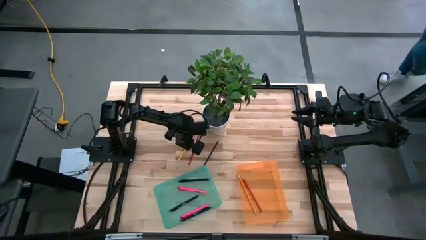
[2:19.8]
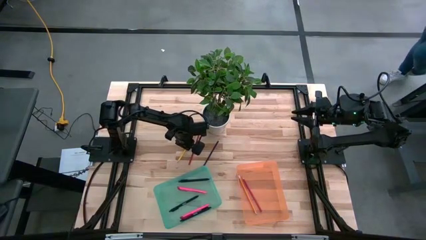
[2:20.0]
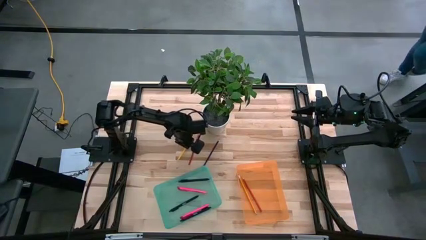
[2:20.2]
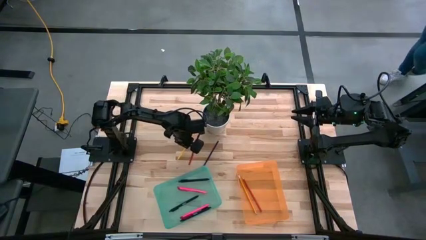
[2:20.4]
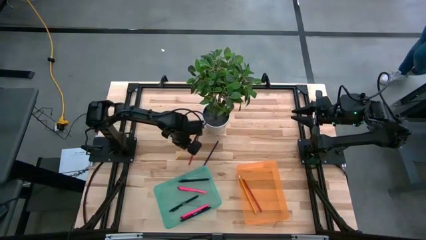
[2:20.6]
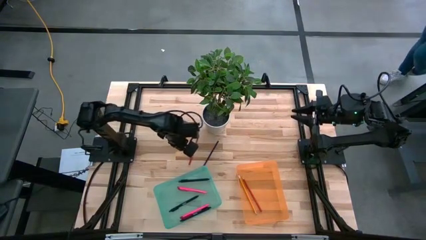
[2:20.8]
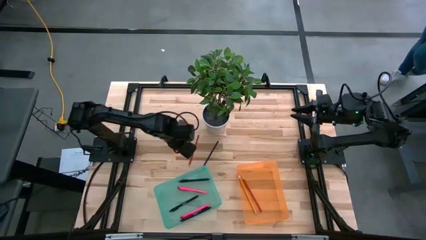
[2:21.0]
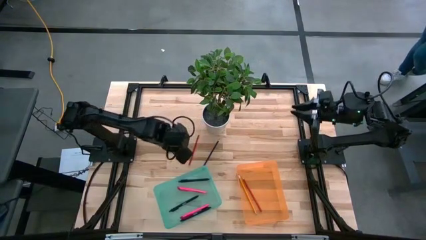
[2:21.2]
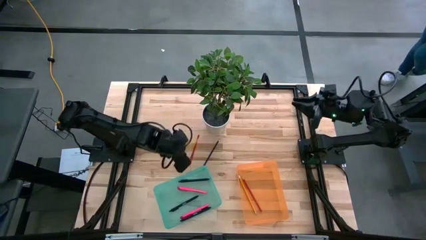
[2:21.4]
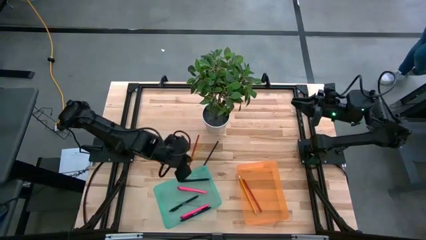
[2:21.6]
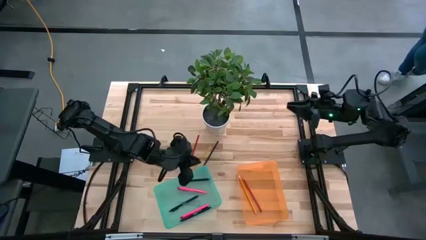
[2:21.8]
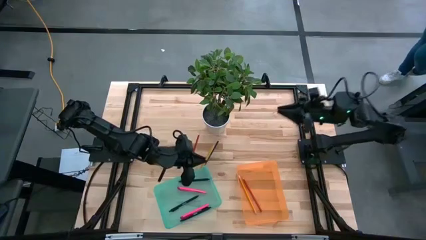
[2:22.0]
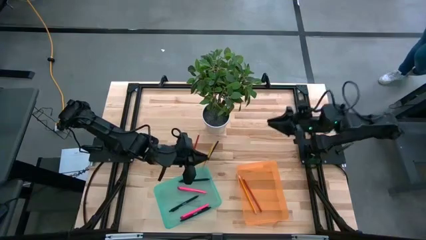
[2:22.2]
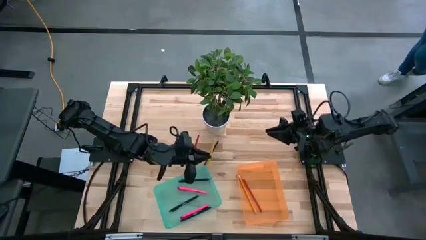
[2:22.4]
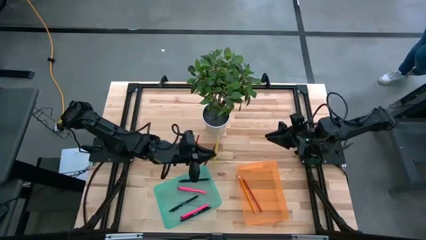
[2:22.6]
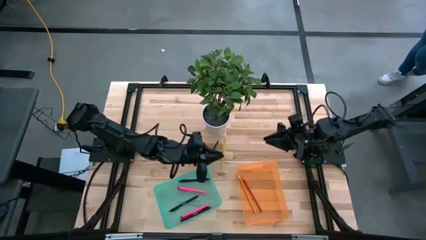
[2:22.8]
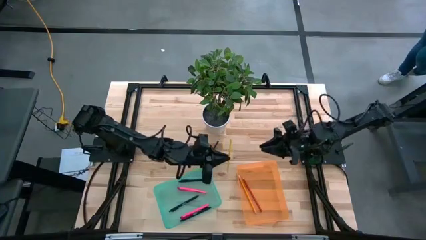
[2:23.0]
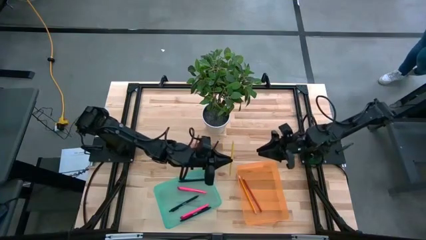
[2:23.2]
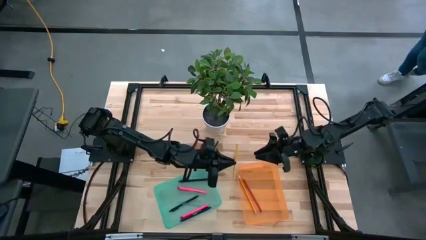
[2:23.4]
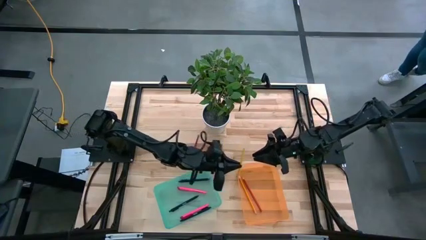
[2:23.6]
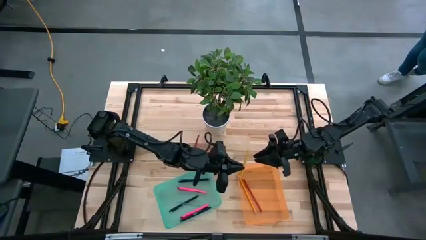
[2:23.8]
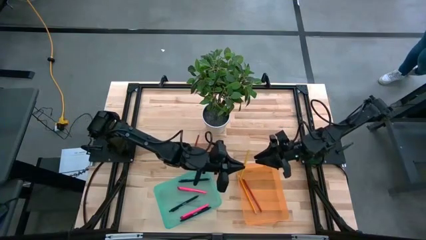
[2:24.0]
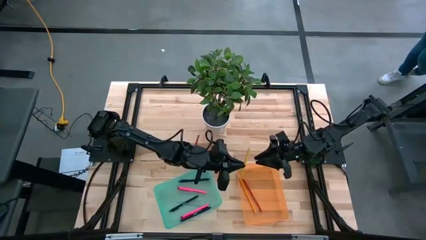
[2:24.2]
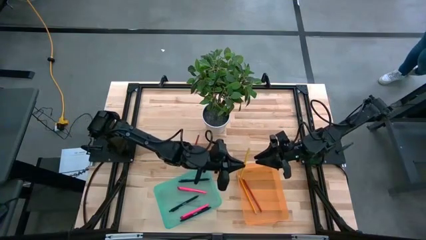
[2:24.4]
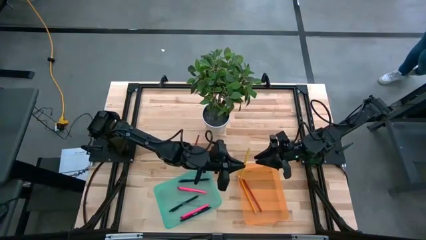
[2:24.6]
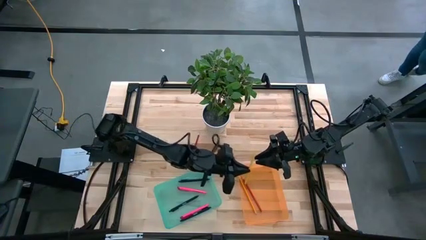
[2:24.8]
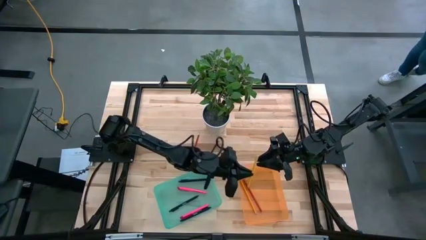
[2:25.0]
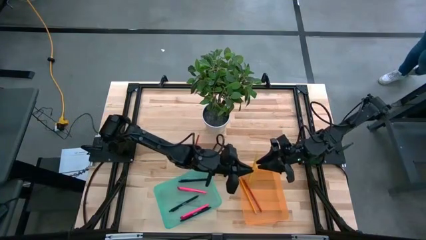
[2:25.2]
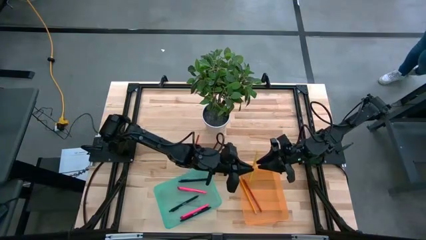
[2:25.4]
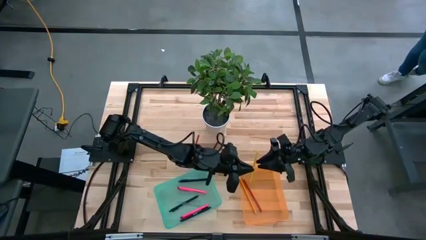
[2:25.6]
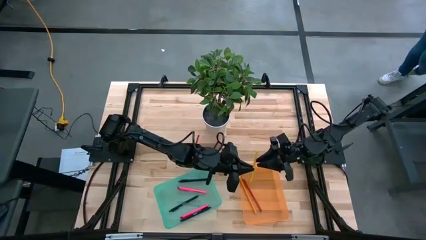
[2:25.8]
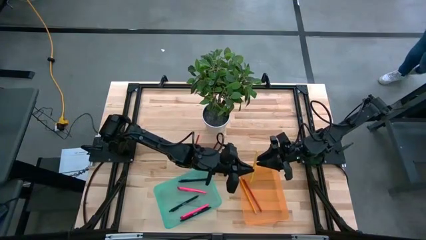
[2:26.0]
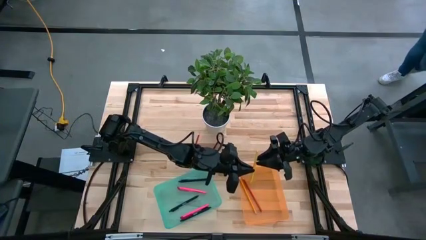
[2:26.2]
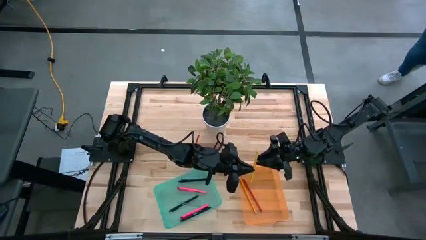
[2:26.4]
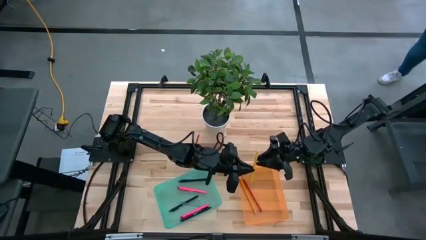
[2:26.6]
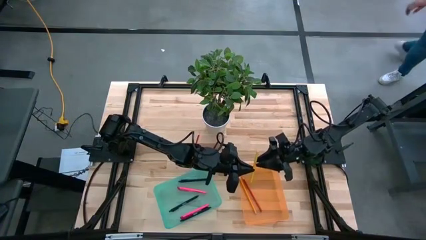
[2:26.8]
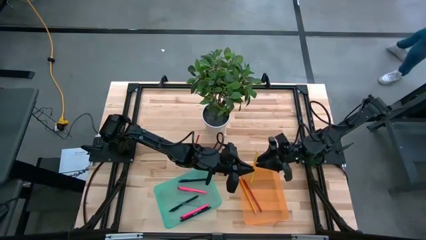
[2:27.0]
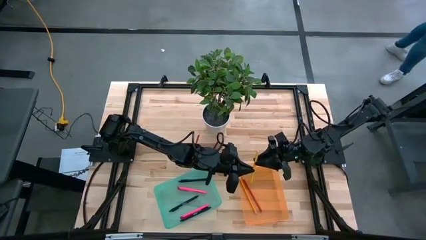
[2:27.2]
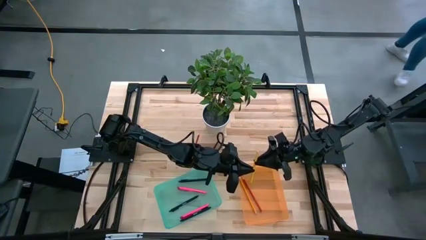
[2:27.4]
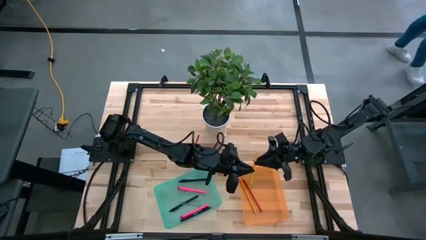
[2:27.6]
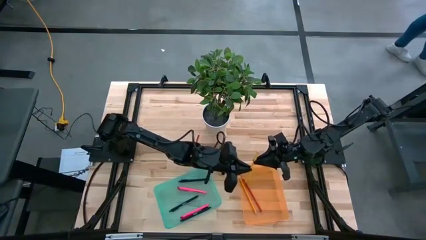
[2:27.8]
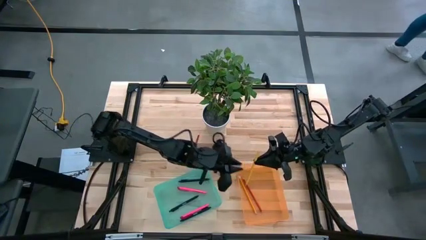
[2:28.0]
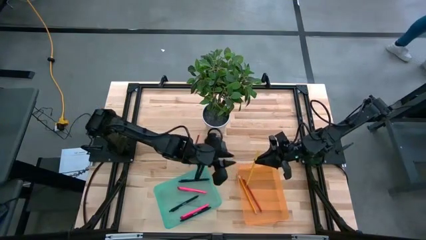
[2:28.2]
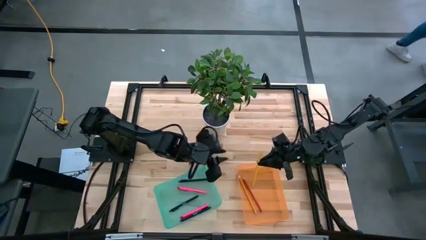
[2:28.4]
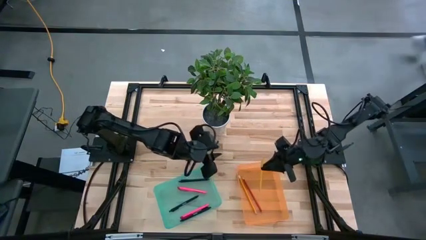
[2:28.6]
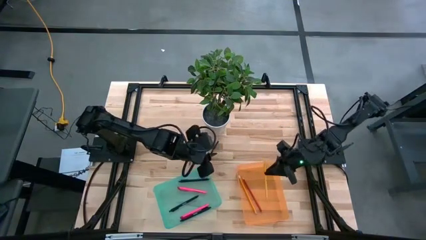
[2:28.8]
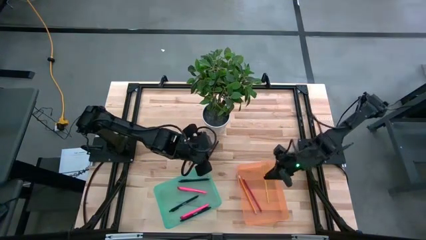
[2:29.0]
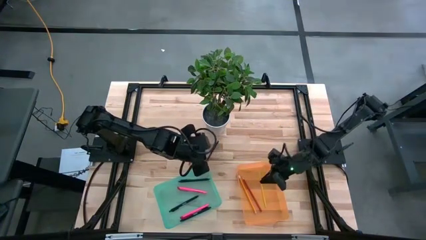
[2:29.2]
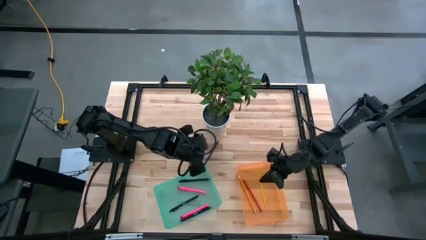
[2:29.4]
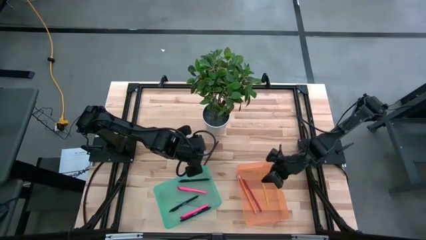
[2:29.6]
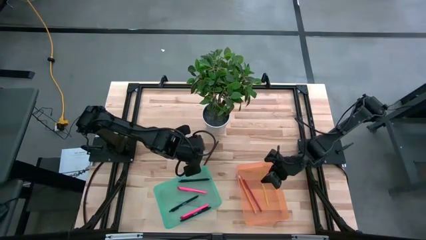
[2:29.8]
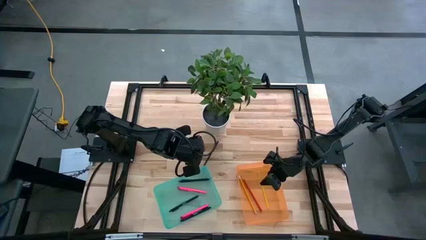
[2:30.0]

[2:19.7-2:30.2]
Task: Sort pens & pencils
Put the yellow pencil into the orange bin

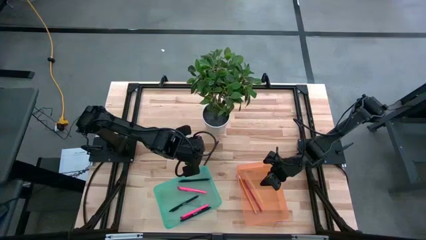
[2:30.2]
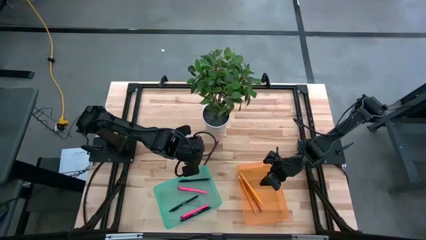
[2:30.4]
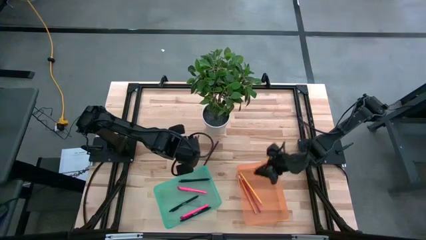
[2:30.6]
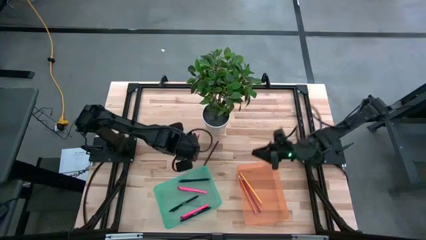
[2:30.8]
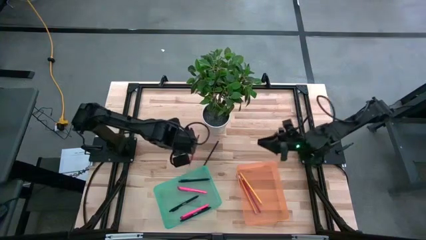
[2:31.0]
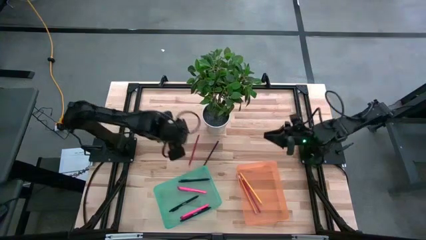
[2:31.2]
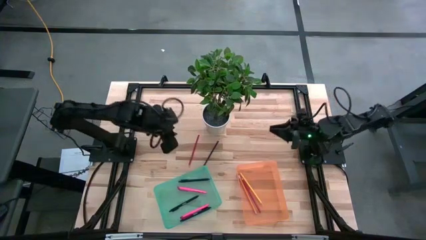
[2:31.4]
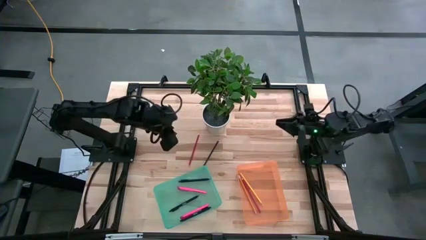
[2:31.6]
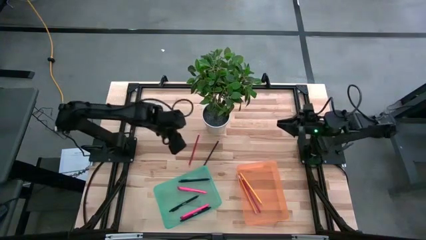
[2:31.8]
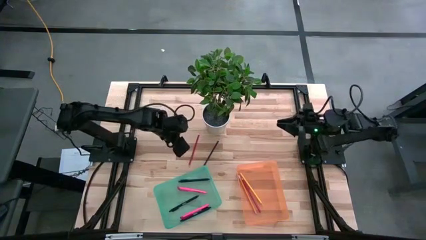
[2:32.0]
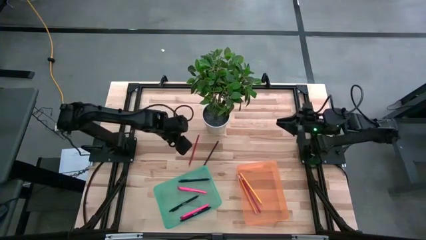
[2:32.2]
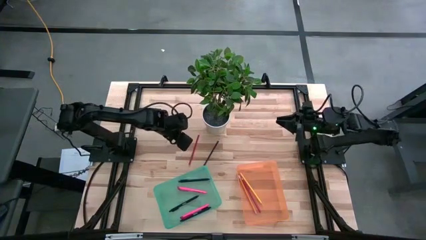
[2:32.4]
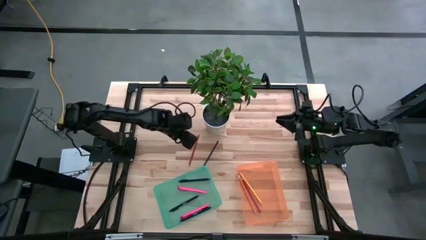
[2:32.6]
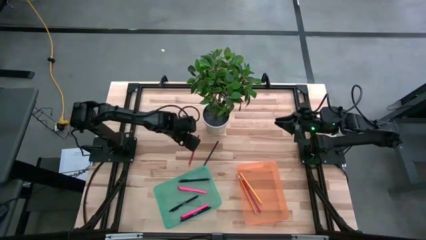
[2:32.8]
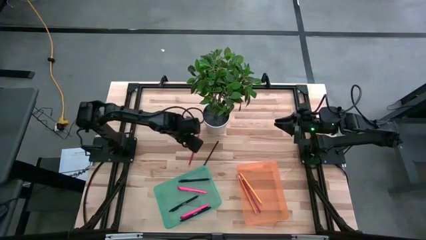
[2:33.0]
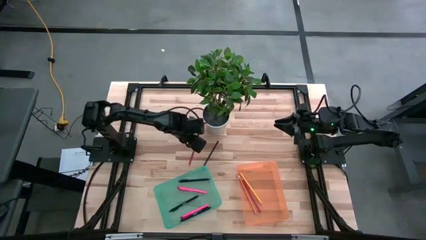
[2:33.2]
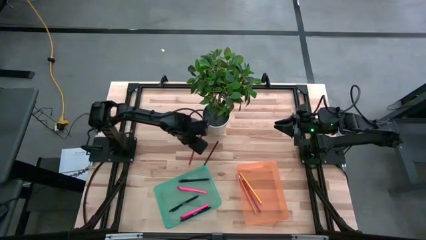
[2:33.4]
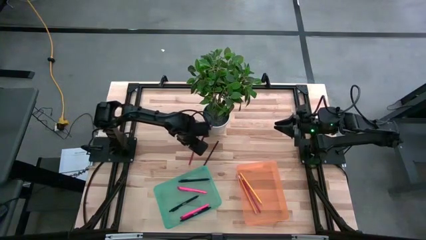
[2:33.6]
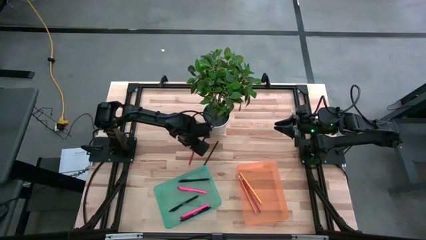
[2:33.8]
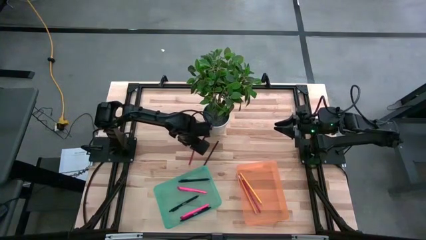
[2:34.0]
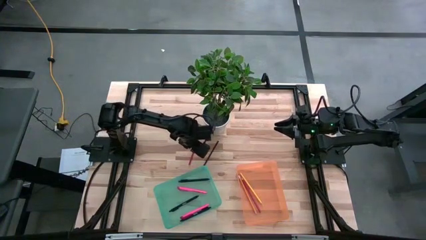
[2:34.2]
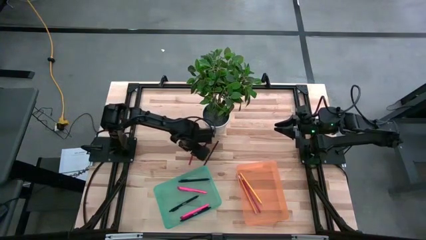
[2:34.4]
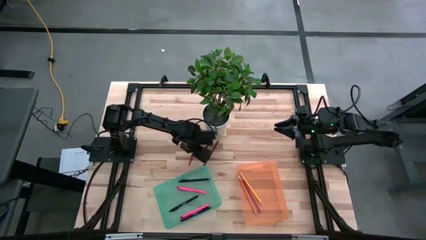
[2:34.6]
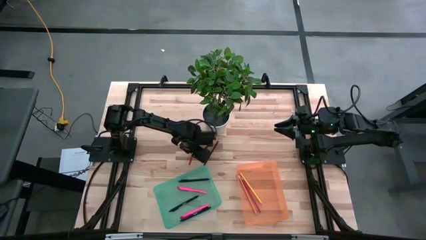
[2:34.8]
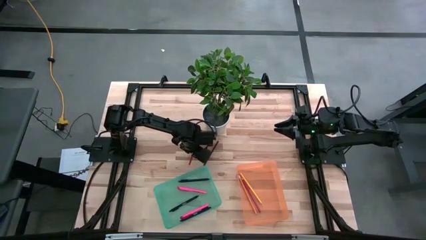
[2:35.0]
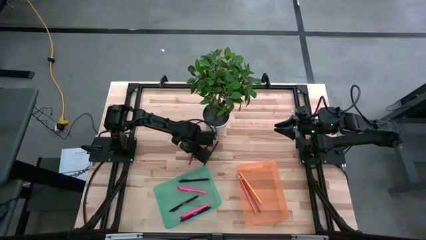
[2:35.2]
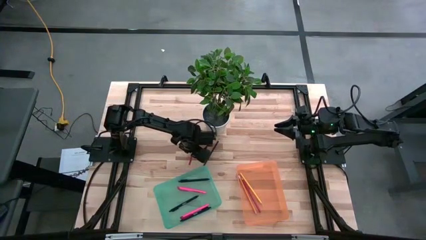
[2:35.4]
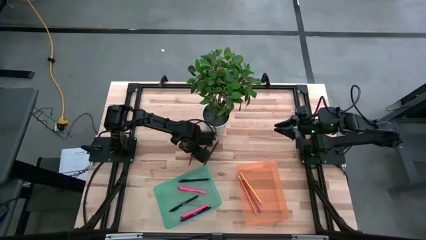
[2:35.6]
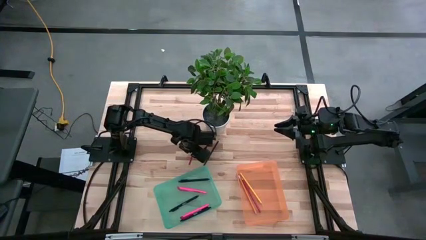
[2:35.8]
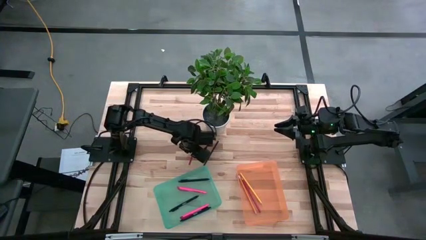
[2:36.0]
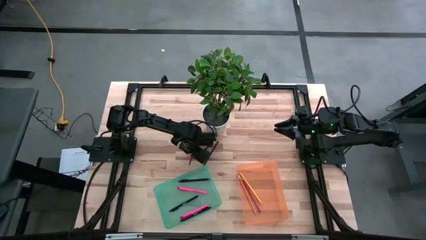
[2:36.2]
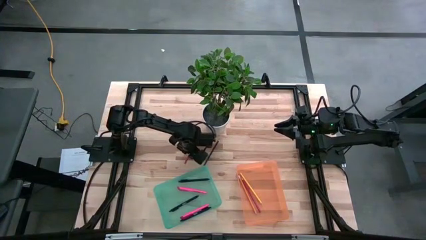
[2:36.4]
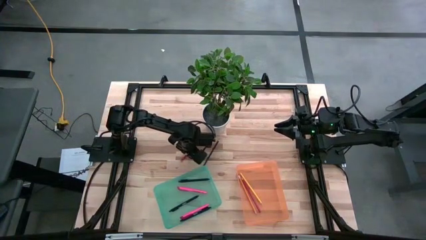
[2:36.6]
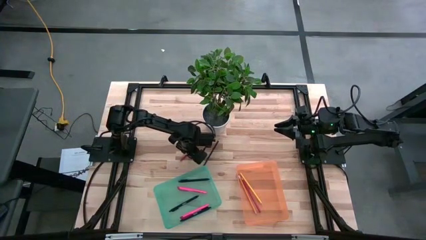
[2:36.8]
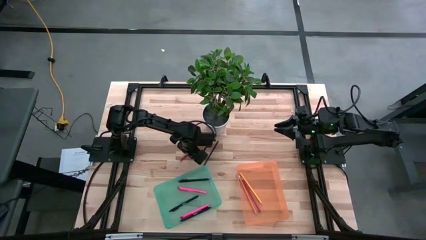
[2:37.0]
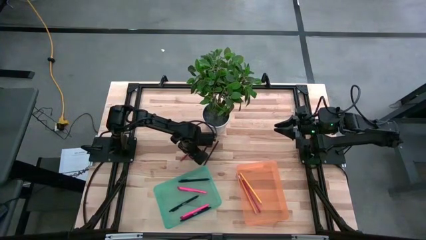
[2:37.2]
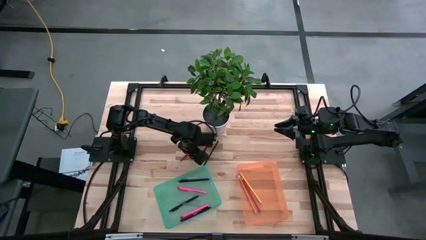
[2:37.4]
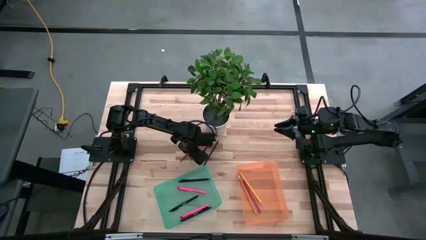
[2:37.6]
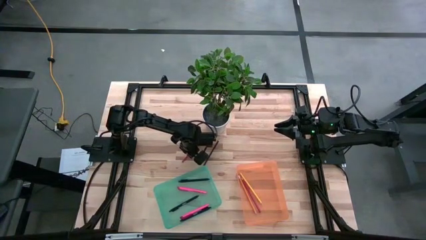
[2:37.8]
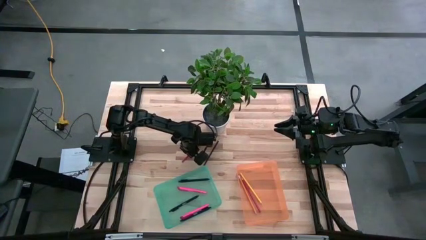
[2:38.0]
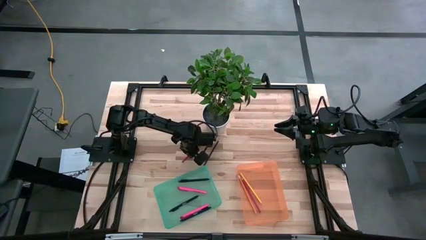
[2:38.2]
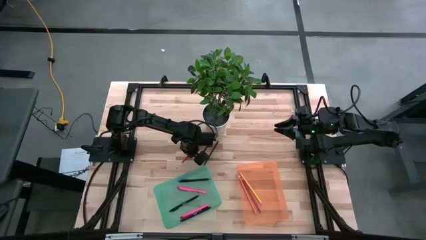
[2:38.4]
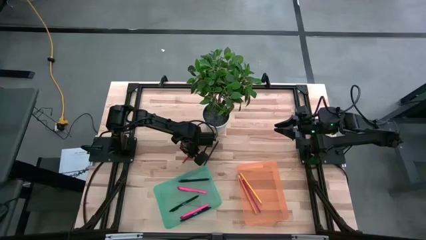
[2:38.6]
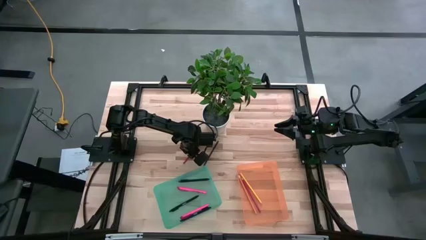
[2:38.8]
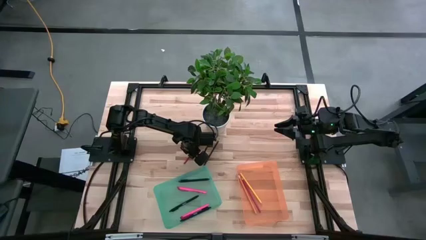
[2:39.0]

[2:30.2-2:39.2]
Put the red pencil into the orange bin
